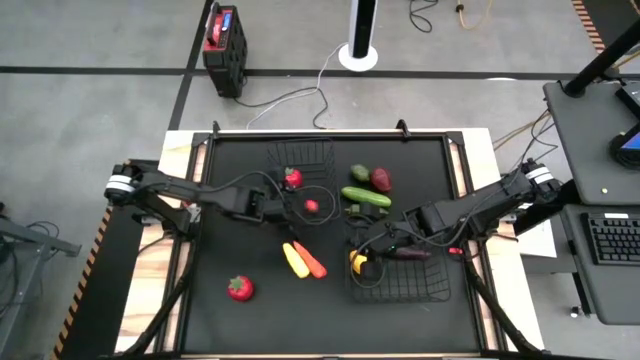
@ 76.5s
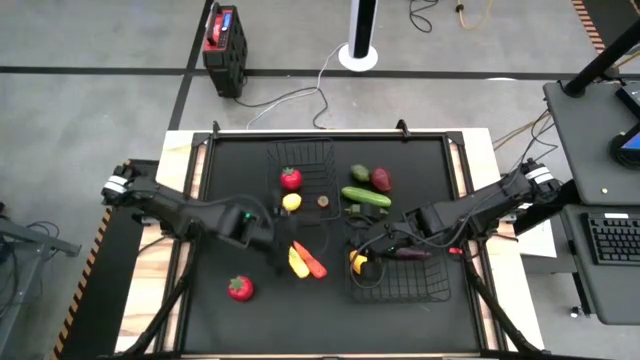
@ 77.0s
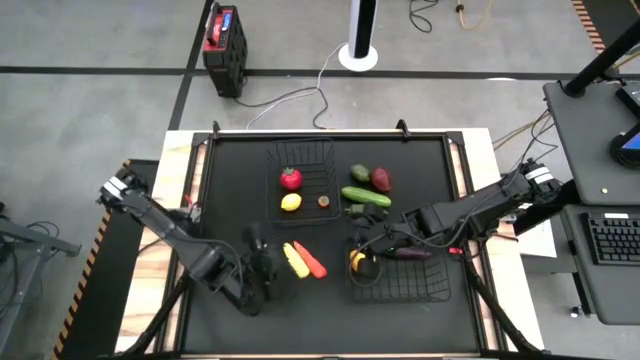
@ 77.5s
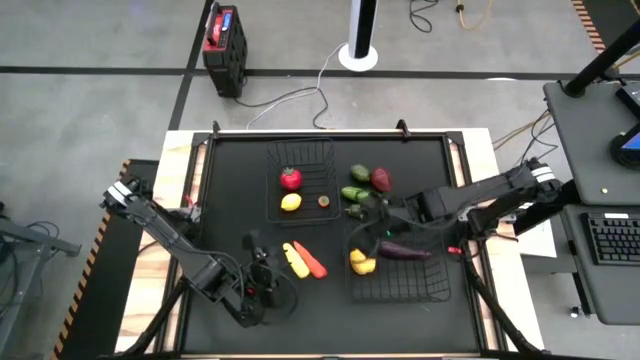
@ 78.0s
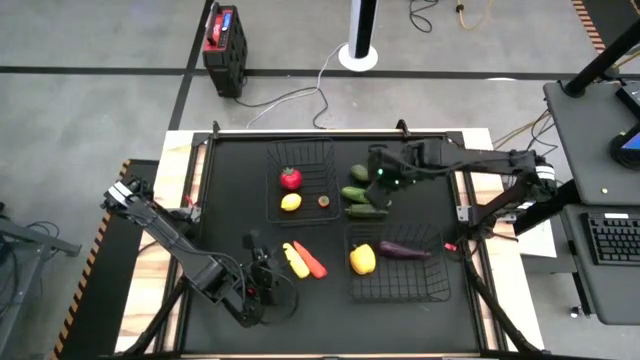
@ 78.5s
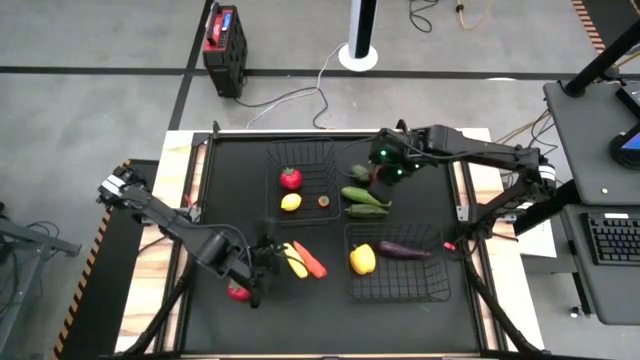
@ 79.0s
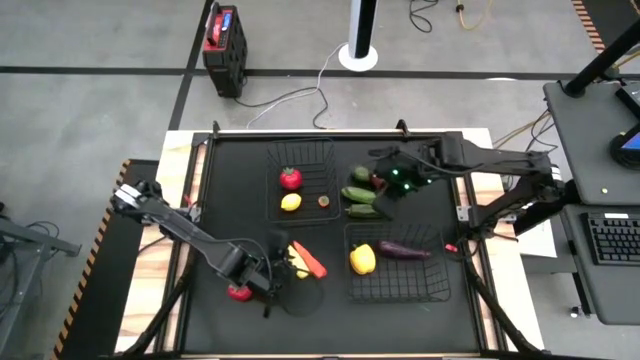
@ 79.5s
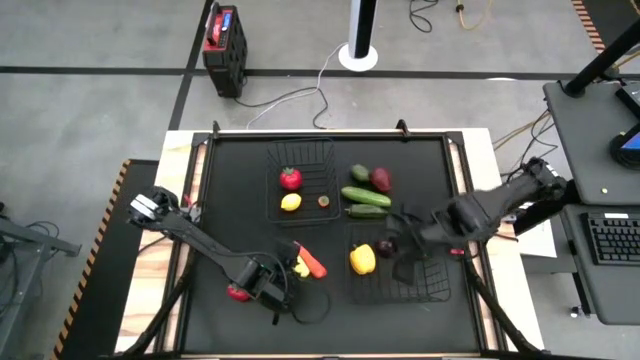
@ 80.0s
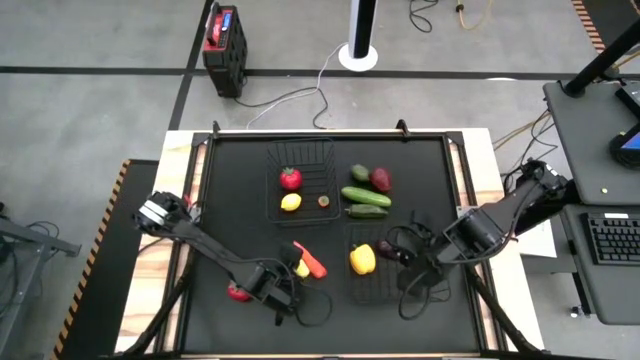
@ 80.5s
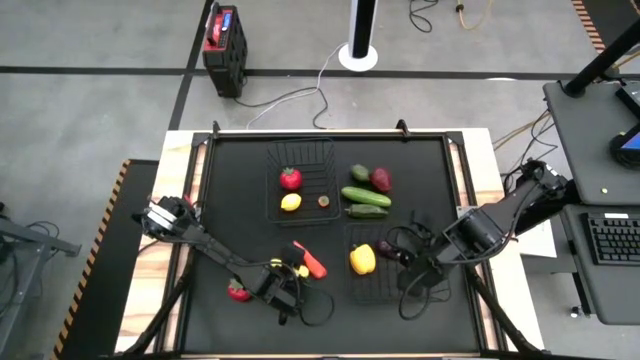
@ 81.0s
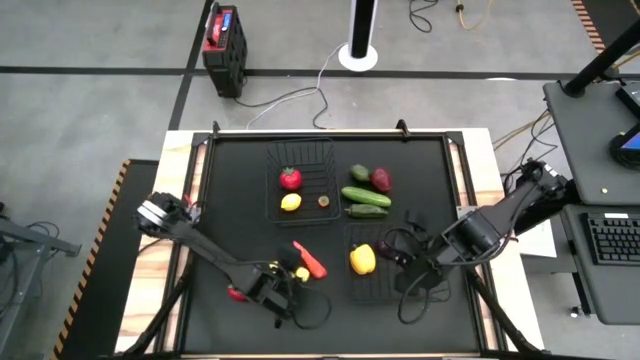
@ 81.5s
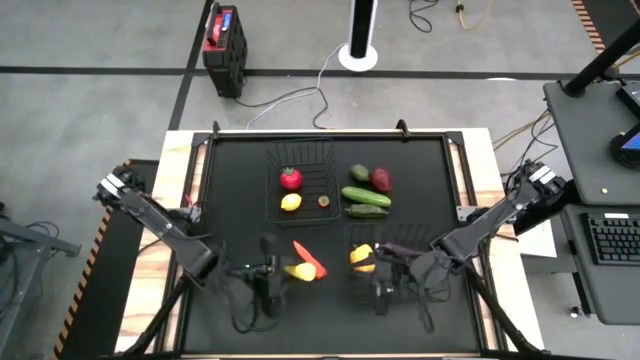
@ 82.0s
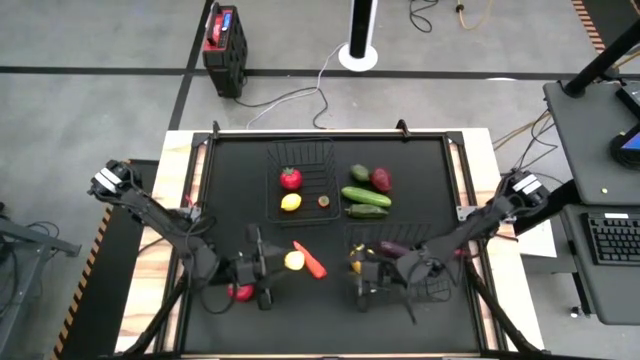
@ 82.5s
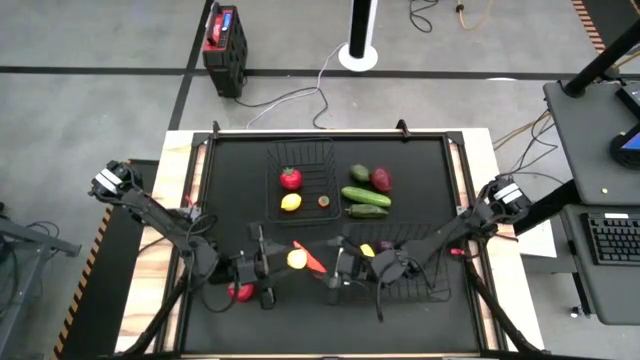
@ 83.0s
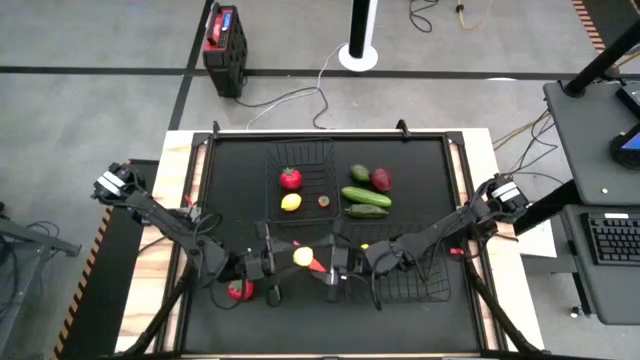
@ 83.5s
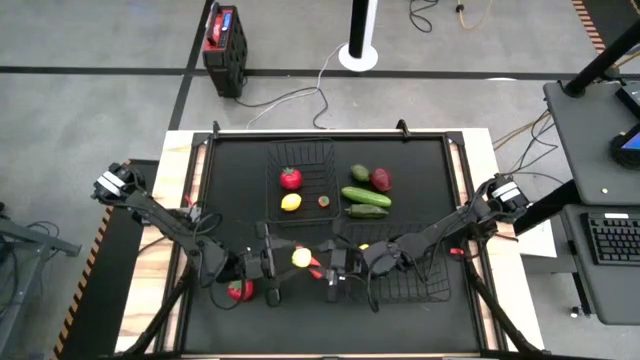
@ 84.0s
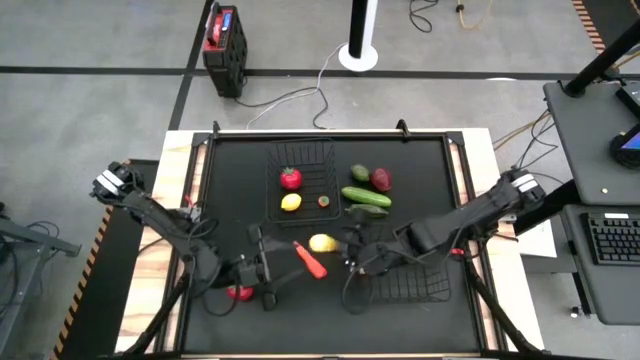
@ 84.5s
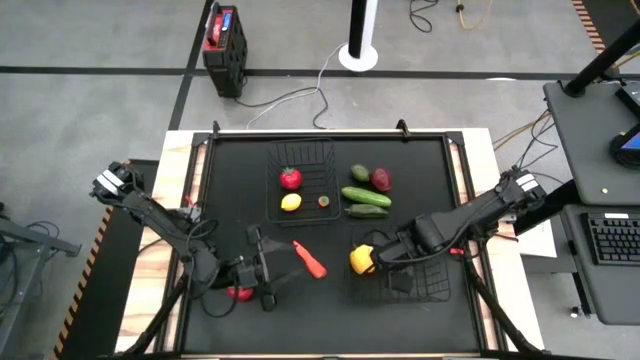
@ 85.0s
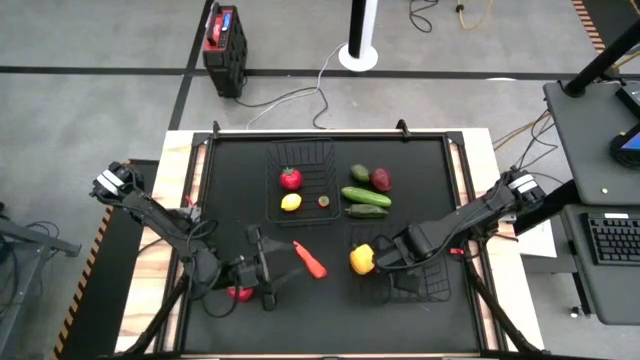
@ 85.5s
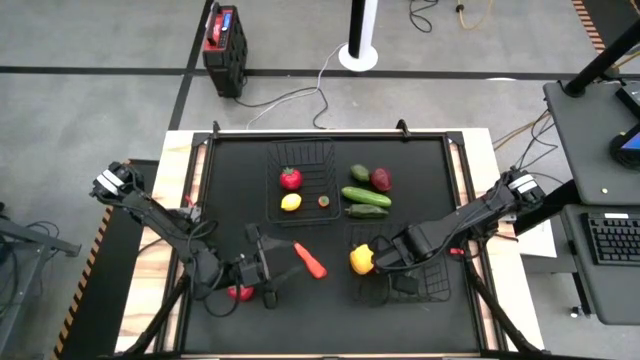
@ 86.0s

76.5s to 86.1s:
Task: Sort produce into baskets
Put the yellow corn into the bottom black wire basket

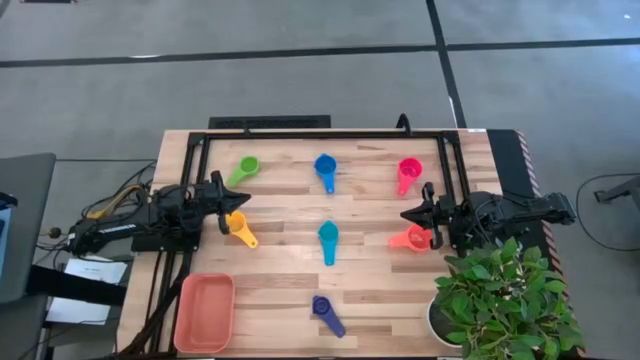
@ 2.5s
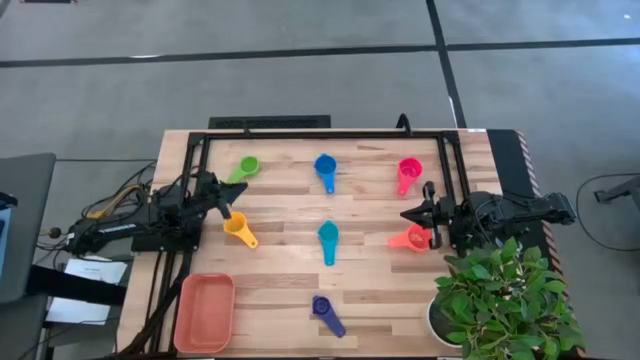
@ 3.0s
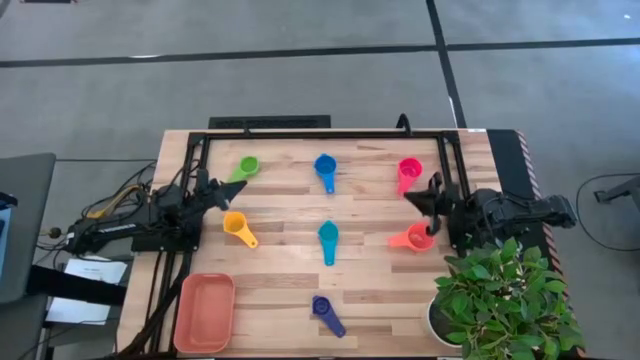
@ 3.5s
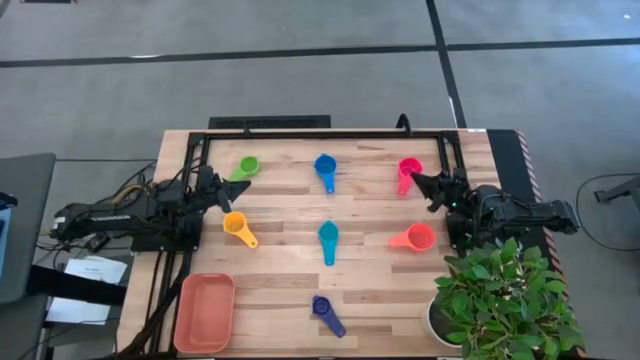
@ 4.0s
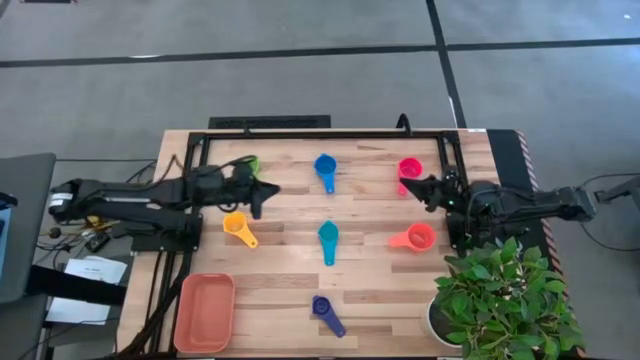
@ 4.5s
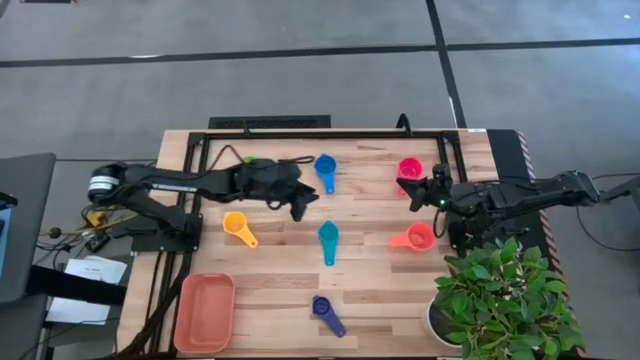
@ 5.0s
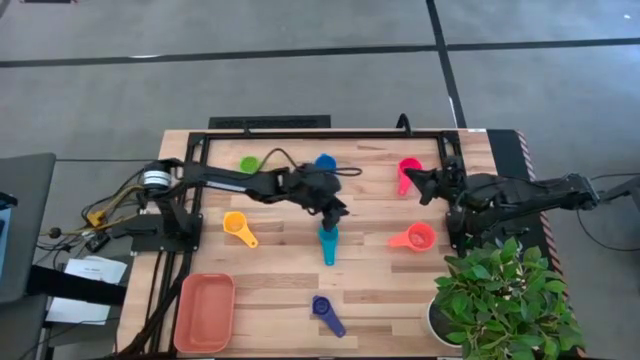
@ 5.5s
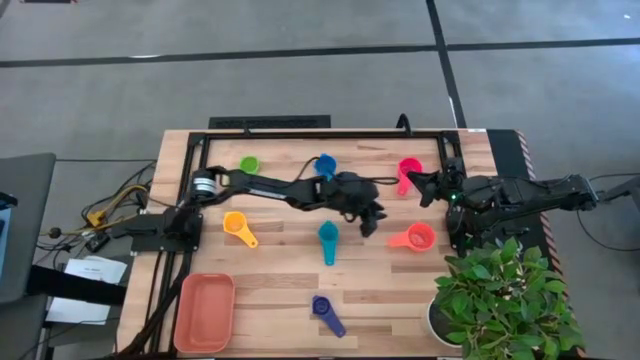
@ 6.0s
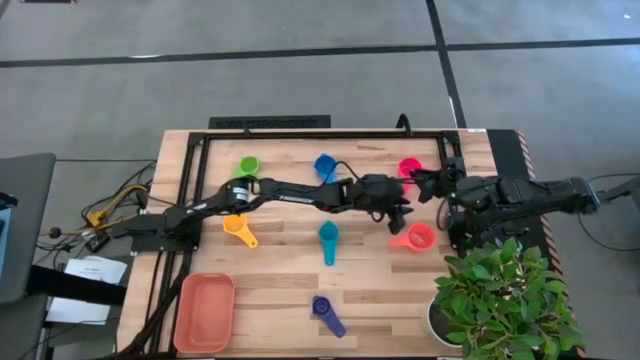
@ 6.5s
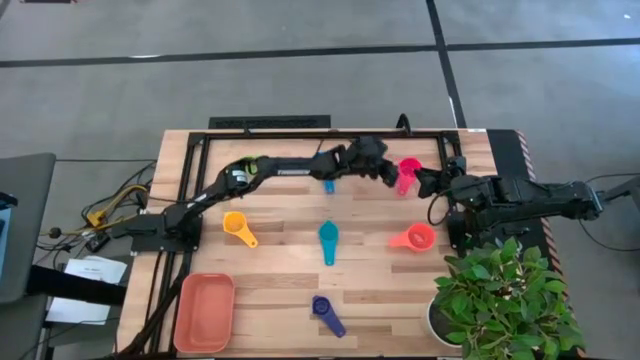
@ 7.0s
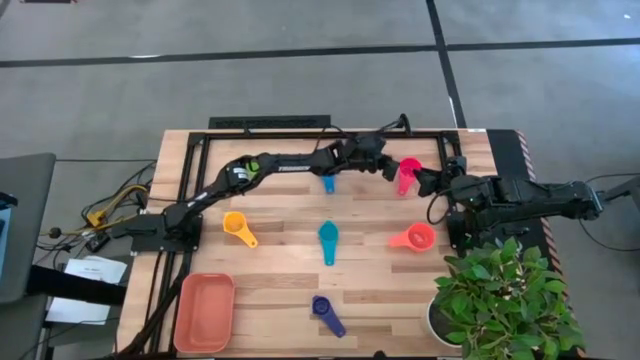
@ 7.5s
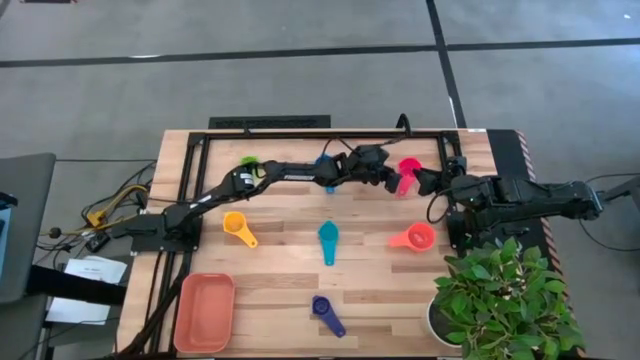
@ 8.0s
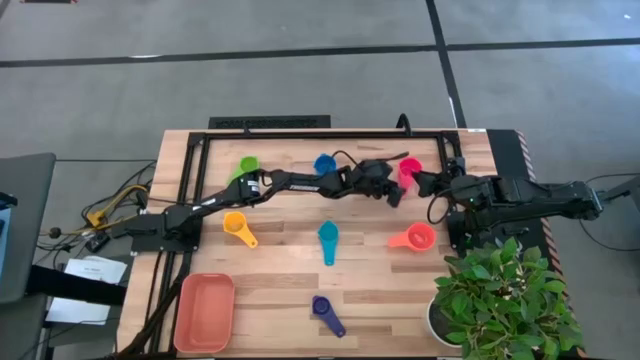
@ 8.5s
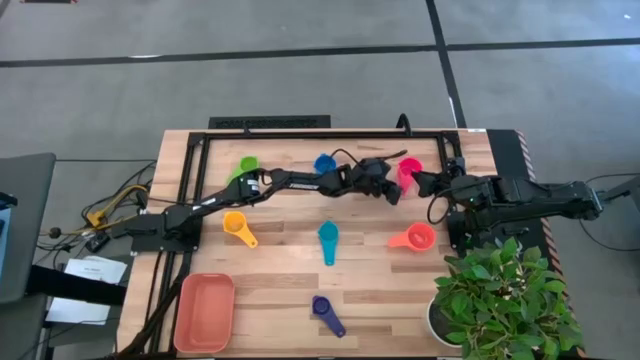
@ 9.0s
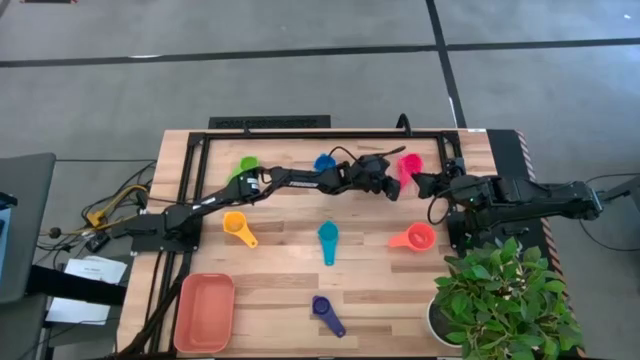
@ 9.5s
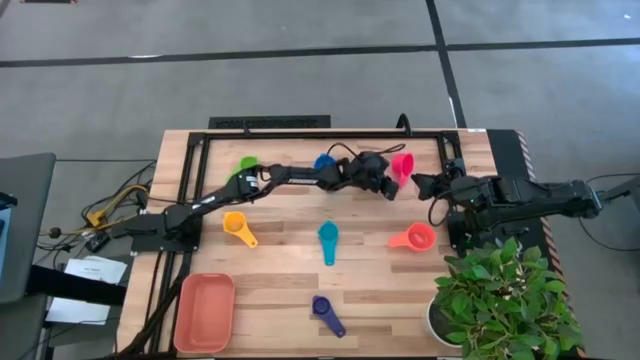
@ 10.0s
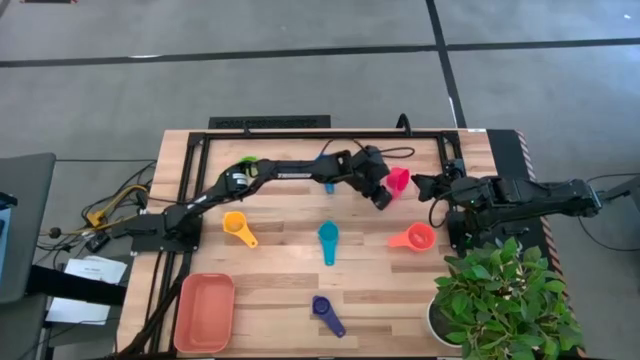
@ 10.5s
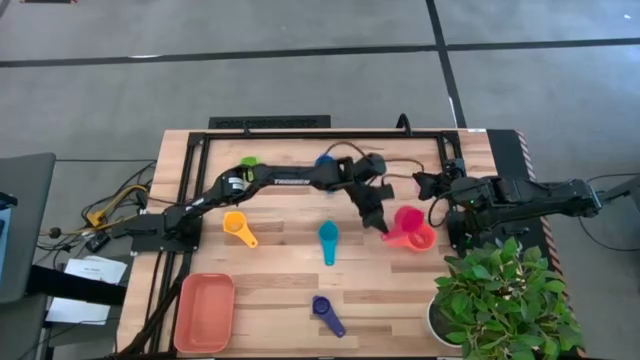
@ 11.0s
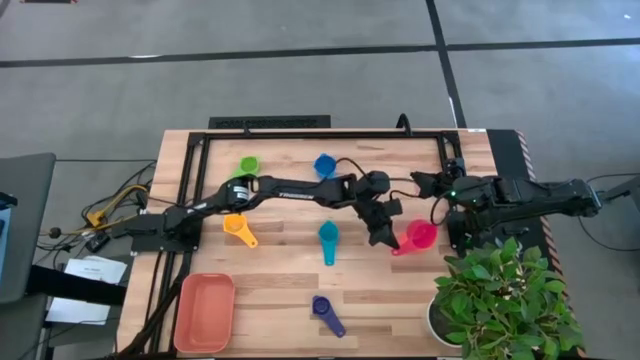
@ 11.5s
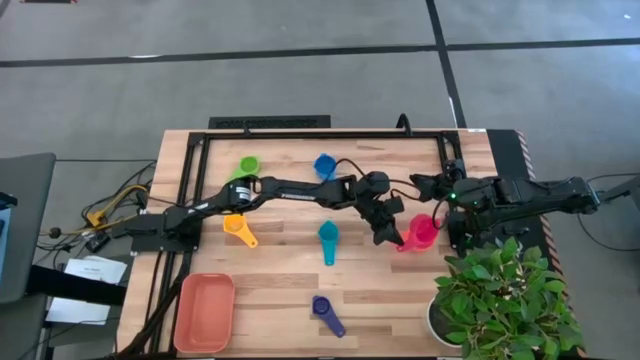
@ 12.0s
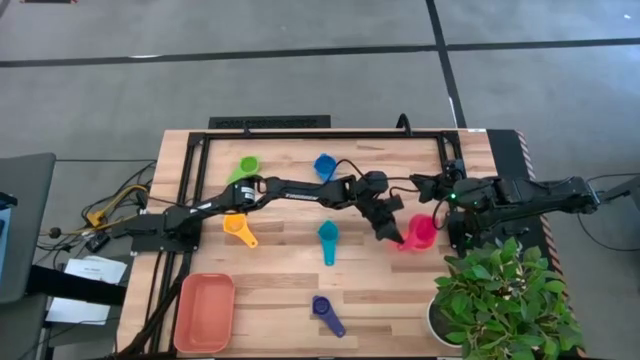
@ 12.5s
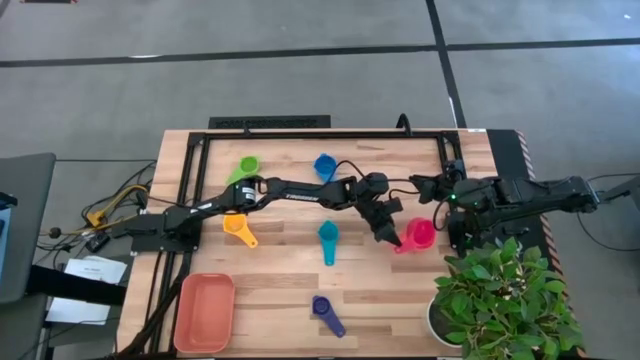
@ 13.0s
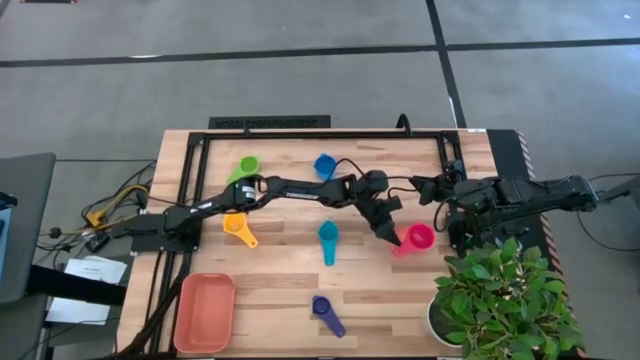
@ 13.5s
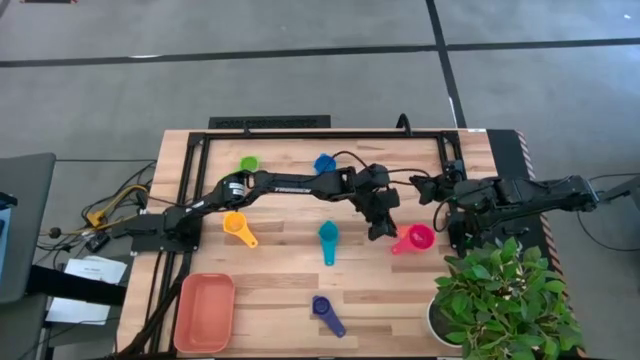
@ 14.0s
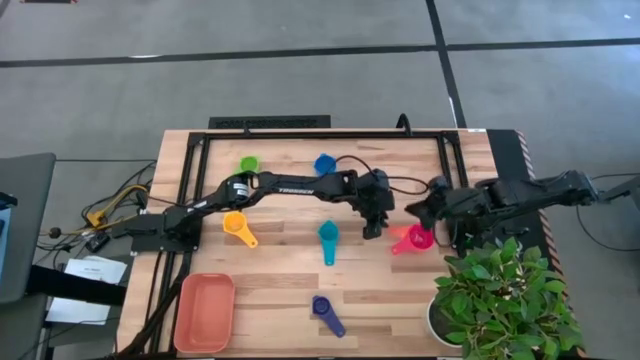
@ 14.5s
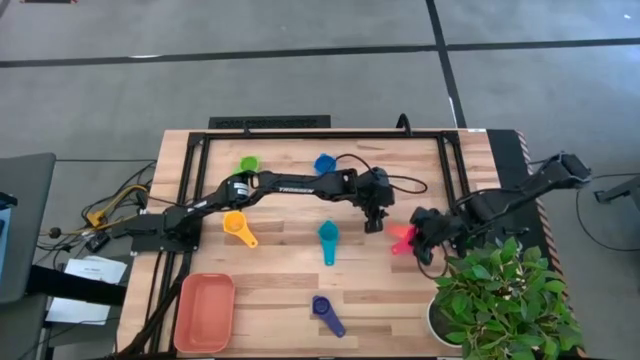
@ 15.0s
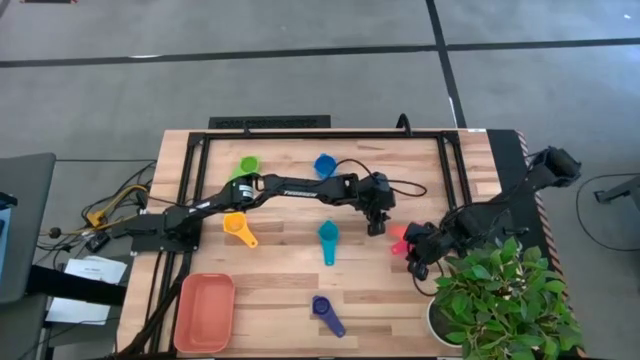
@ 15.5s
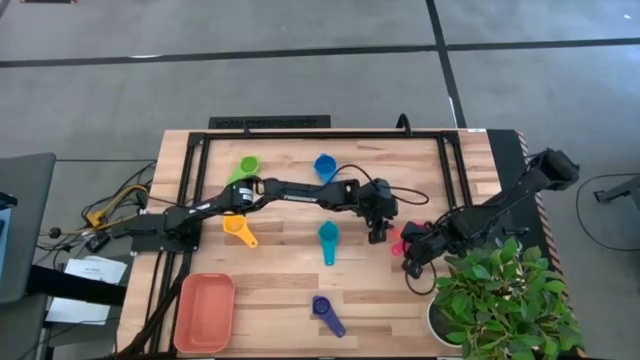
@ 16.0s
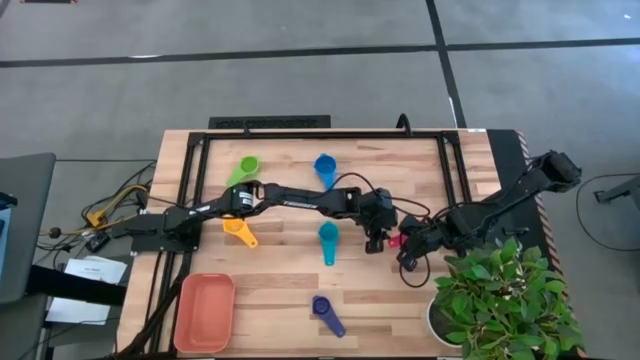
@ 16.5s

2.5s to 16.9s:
Task: Nest measuring cups in basket
Stack the pink measuring cup on top of the orange measuring cup
